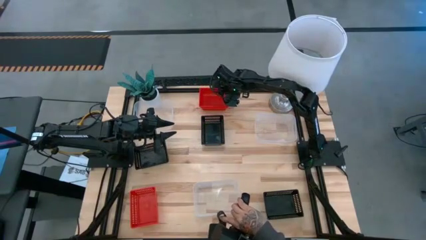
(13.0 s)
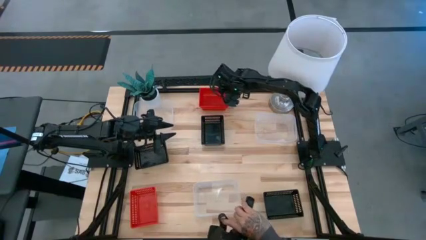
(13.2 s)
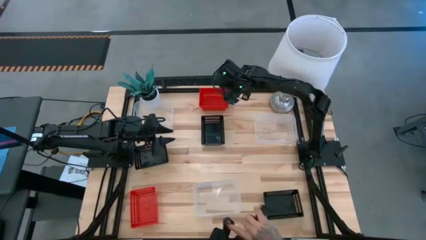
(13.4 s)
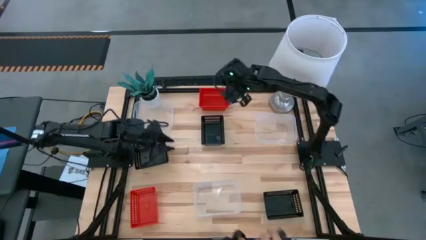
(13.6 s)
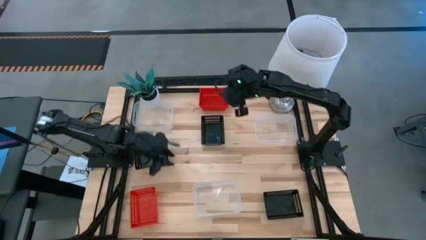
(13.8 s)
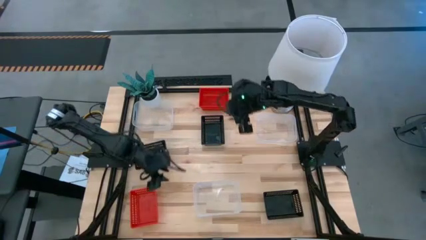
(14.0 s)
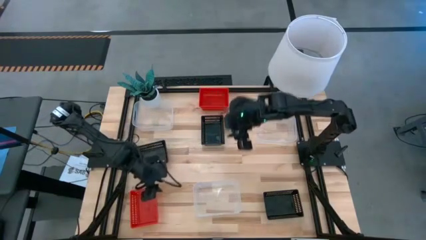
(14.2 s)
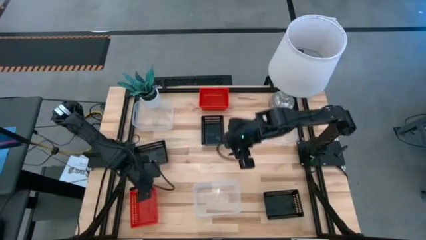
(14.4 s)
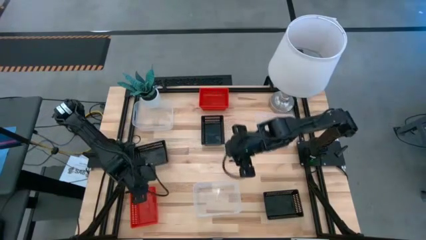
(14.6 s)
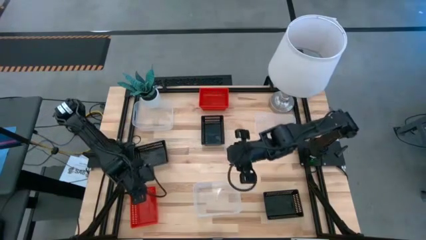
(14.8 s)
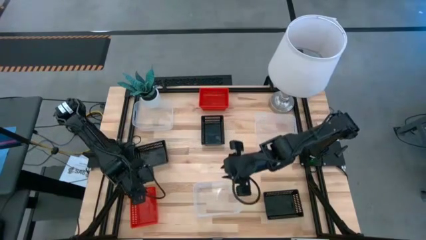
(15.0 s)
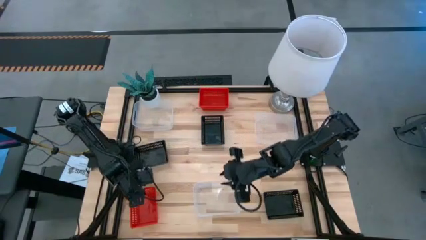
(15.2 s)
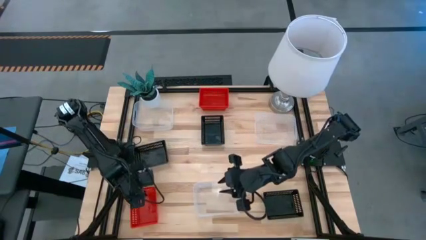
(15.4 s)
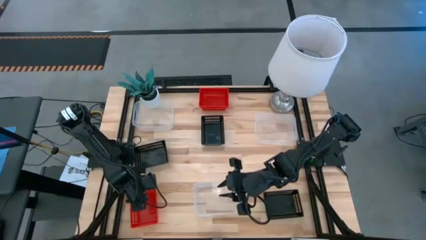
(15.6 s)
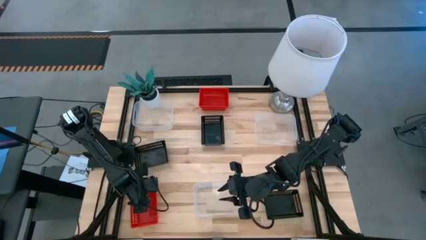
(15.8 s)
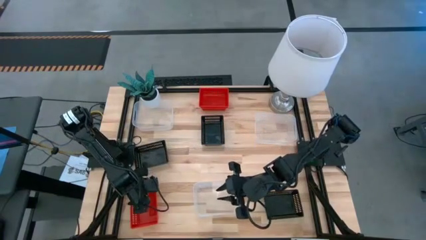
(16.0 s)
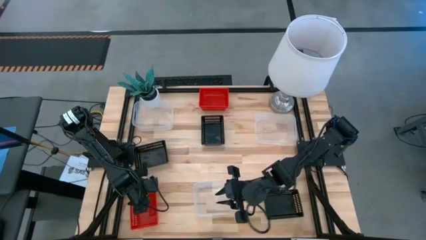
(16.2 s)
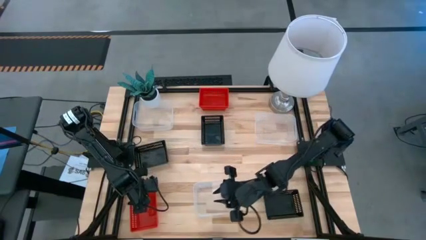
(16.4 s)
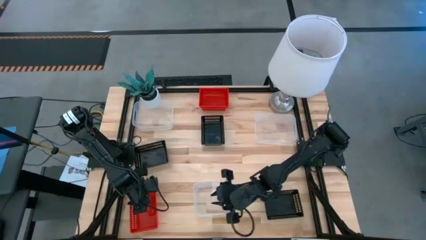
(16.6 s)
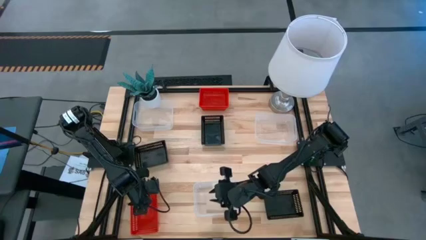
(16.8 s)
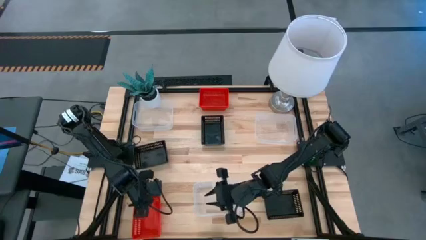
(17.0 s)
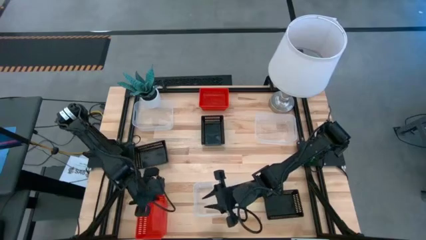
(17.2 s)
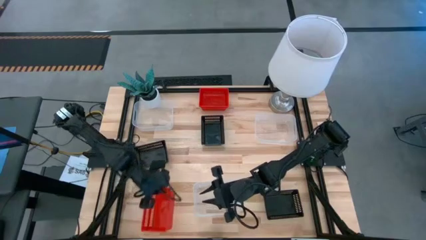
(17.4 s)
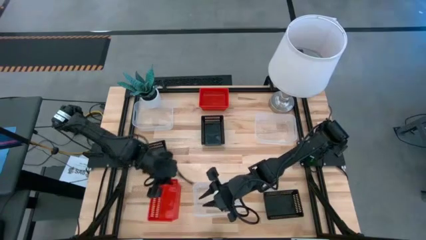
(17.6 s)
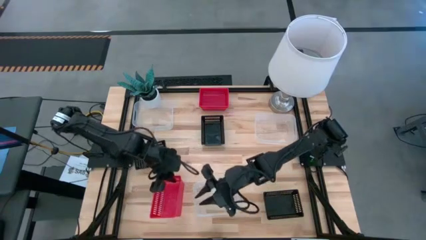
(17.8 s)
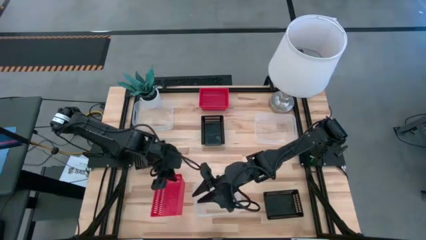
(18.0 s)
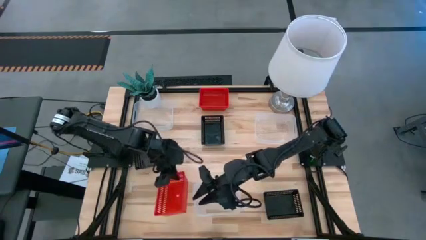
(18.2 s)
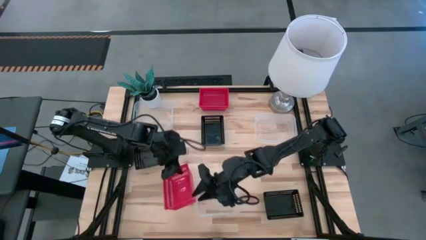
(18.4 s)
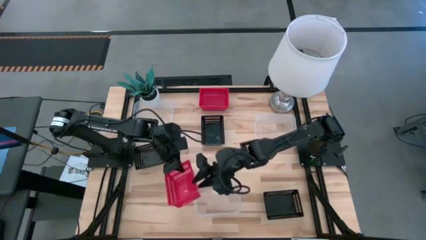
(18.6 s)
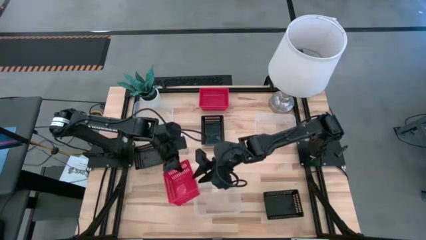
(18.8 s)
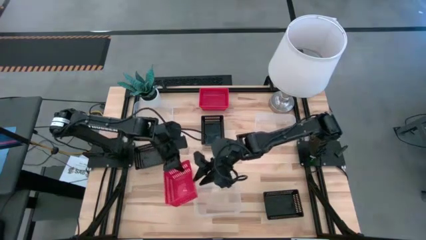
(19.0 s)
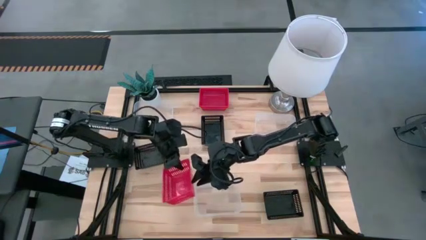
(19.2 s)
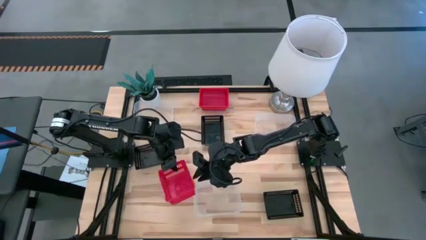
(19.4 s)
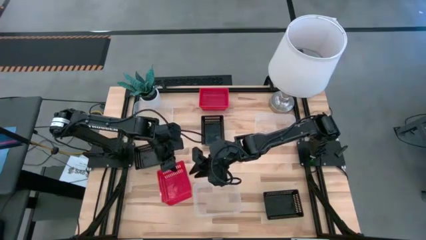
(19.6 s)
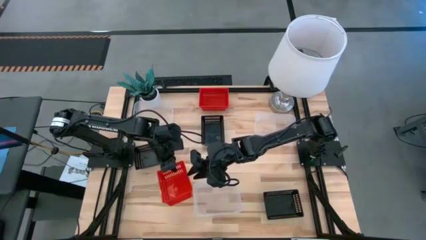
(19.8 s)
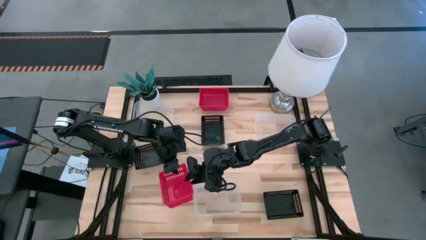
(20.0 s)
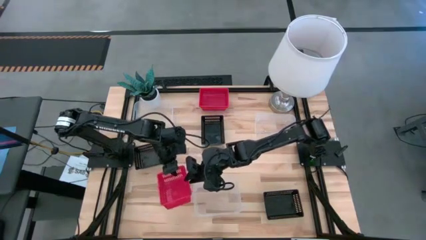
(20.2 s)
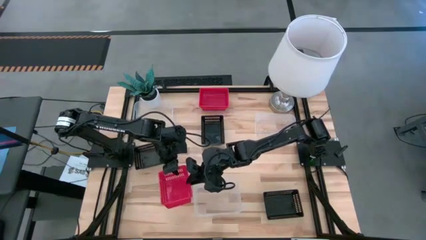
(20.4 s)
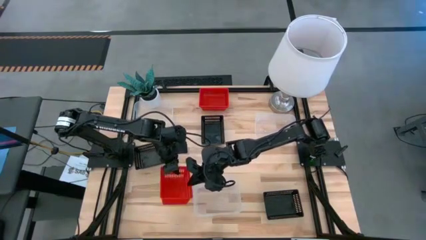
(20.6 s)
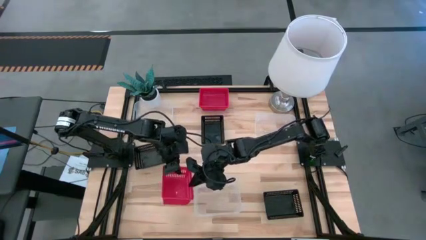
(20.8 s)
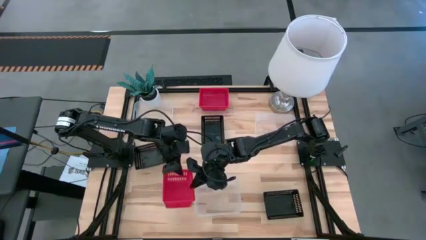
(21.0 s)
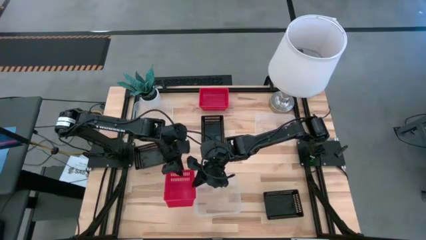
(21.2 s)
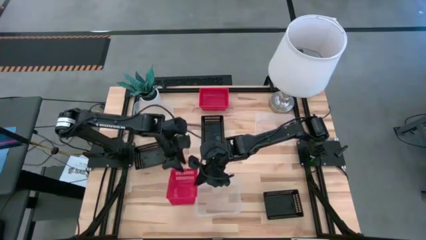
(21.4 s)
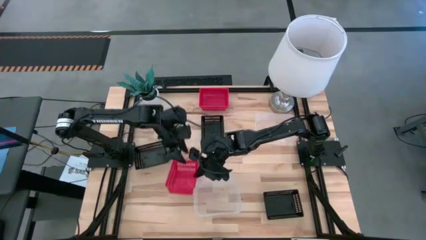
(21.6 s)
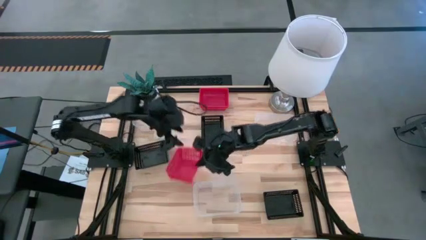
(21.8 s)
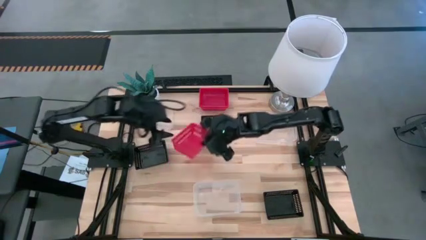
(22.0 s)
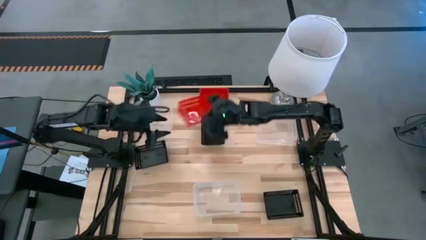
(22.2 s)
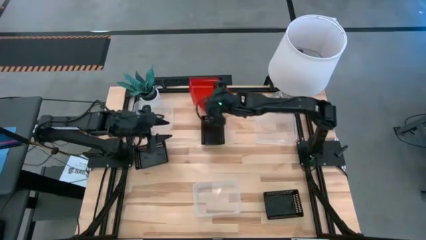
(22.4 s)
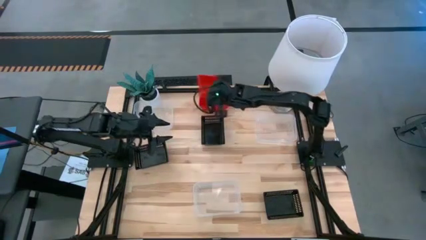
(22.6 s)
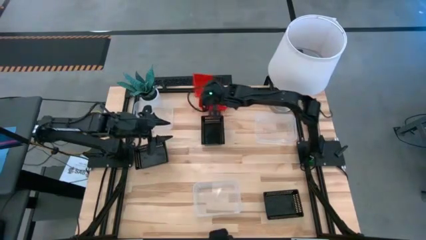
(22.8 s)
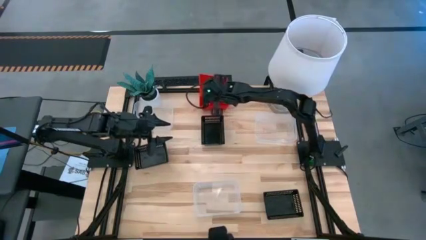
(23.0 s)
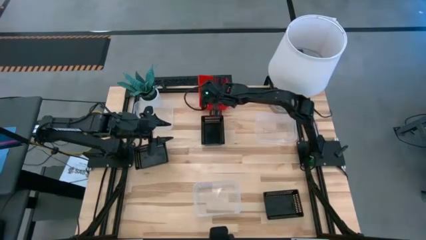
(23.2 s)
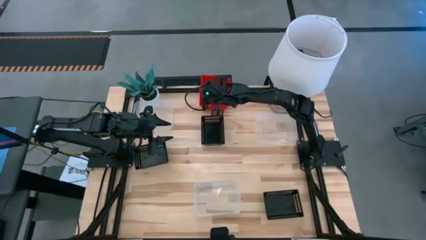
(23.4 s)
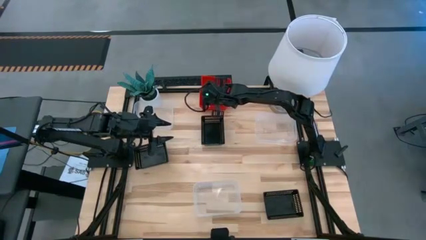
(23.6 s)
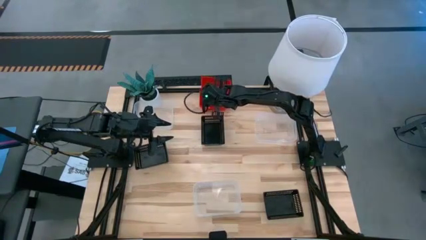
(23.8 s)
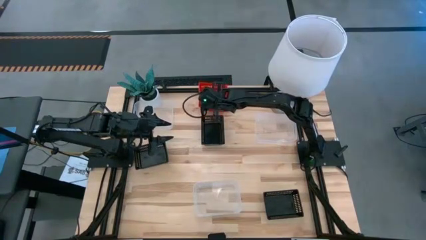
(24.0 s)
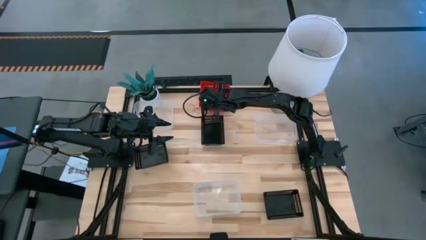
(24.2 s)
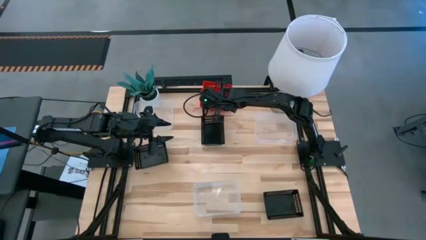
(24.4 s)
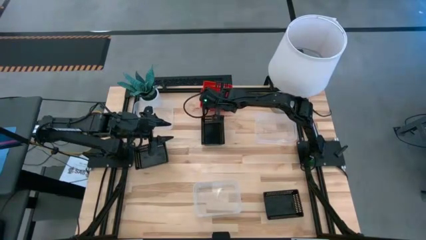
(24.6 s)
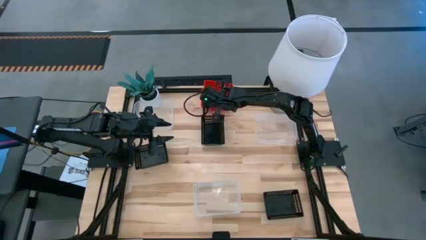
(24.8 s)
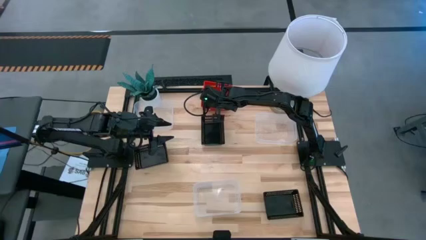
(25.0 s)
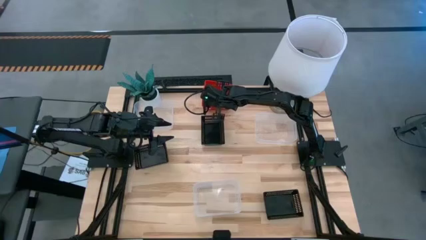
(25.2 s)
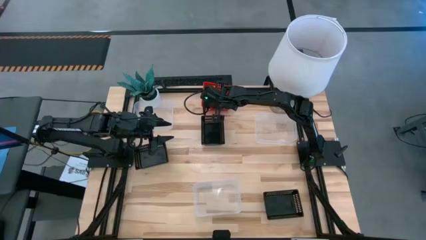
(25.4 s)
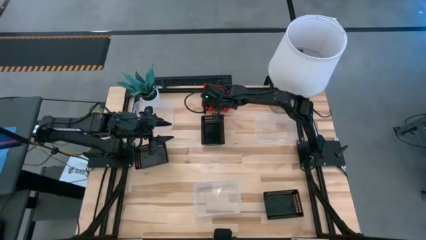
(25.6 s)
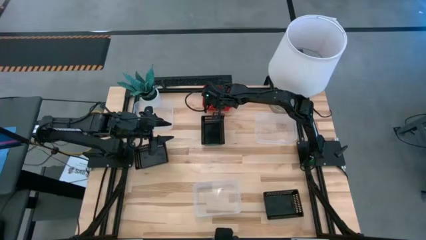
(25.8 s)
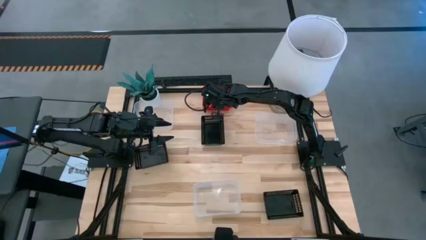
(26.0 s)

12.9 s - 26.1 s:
Stack the bottom red bin on top of the top red bins
